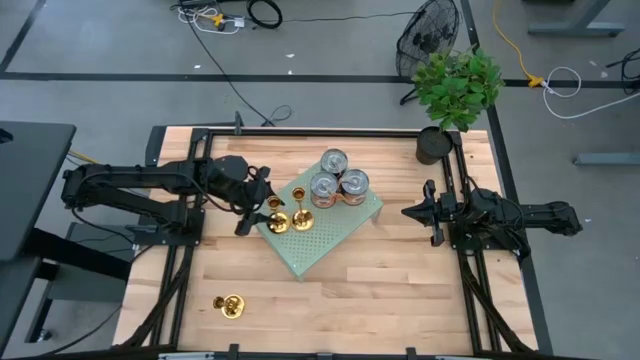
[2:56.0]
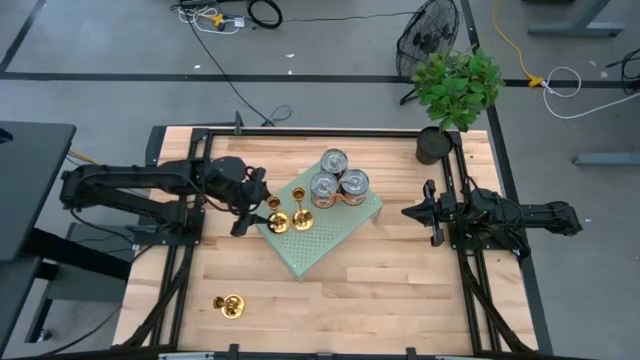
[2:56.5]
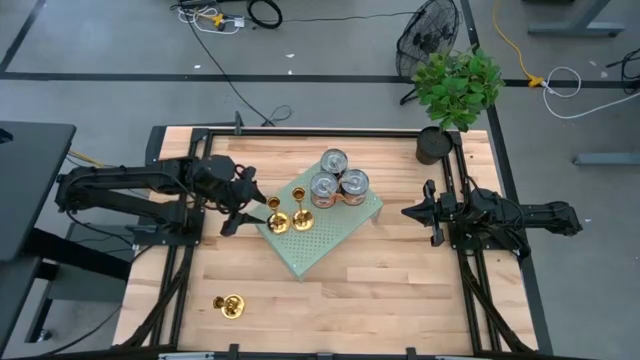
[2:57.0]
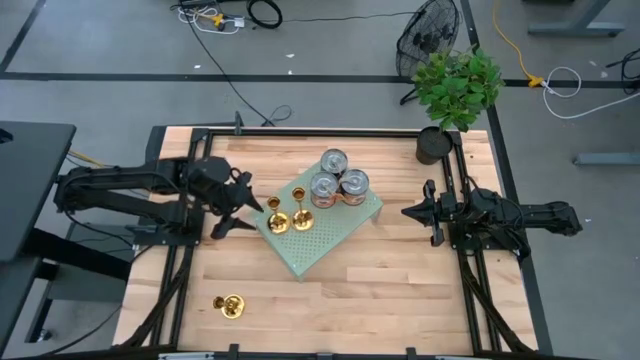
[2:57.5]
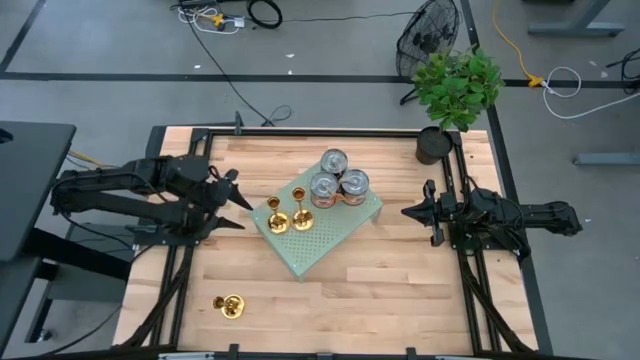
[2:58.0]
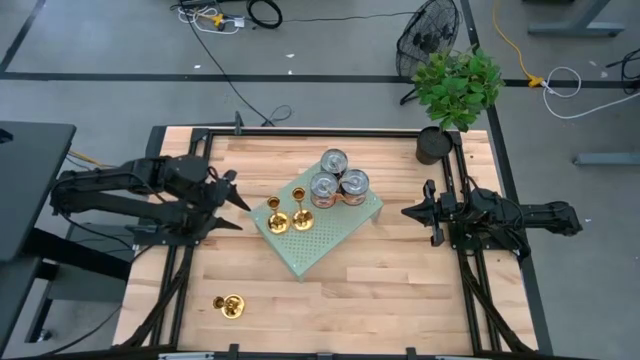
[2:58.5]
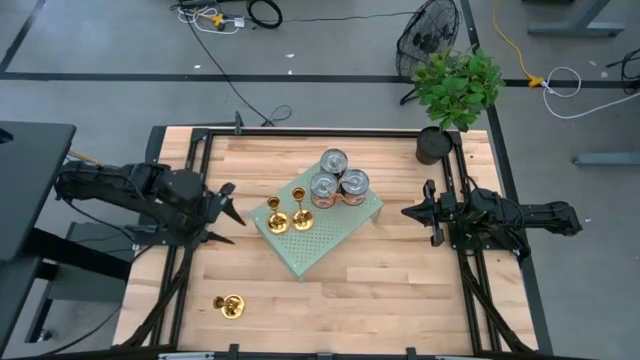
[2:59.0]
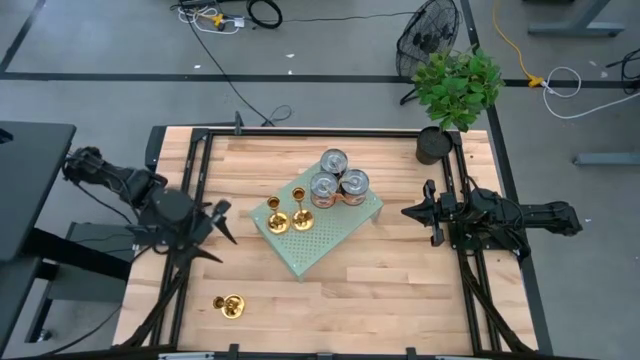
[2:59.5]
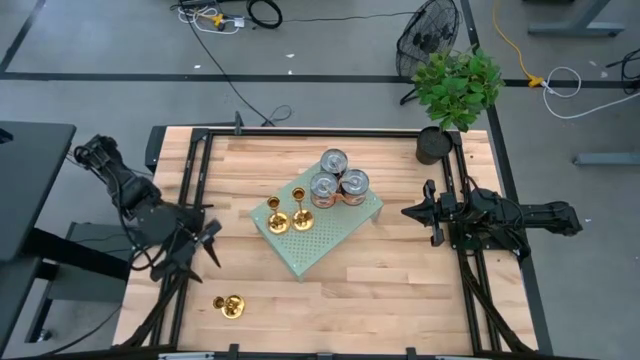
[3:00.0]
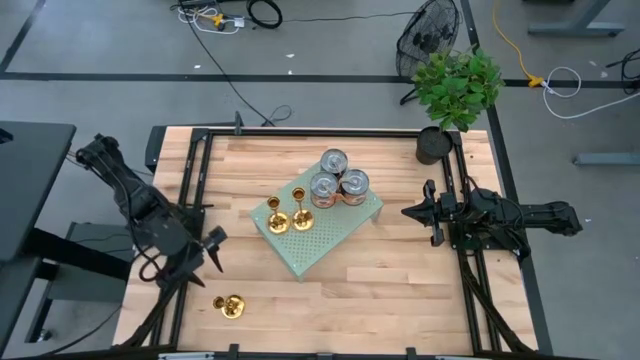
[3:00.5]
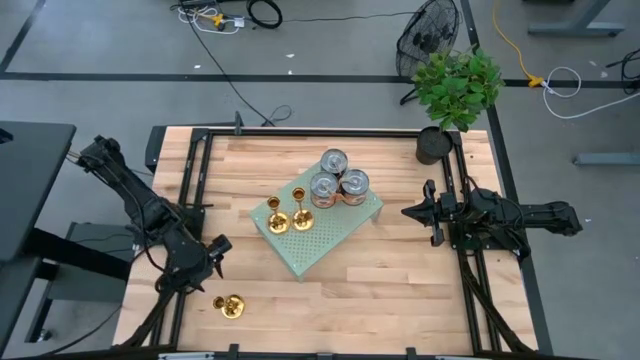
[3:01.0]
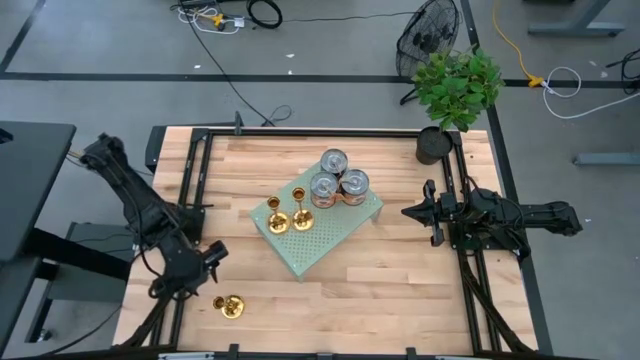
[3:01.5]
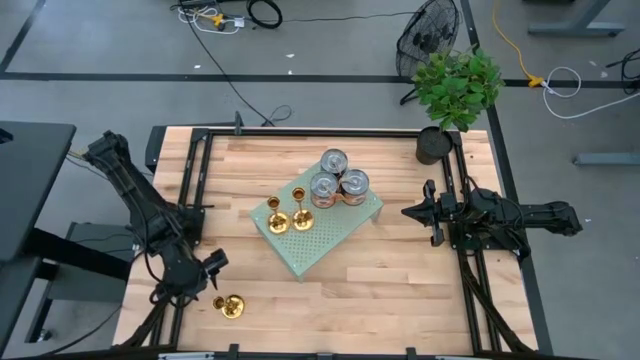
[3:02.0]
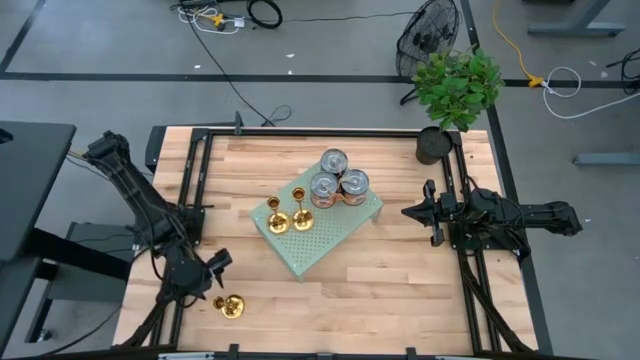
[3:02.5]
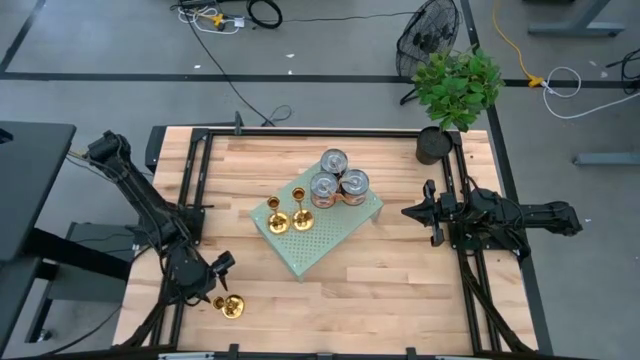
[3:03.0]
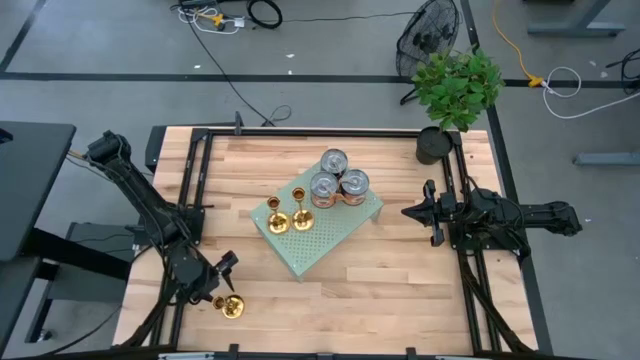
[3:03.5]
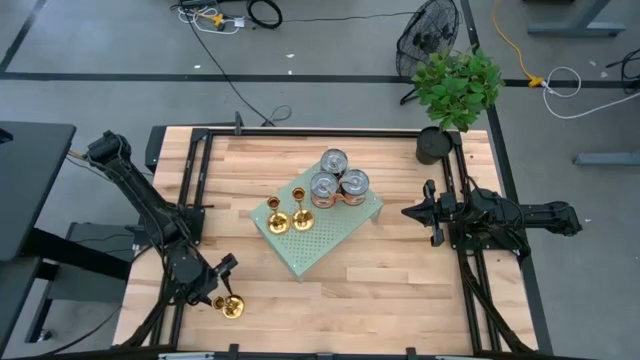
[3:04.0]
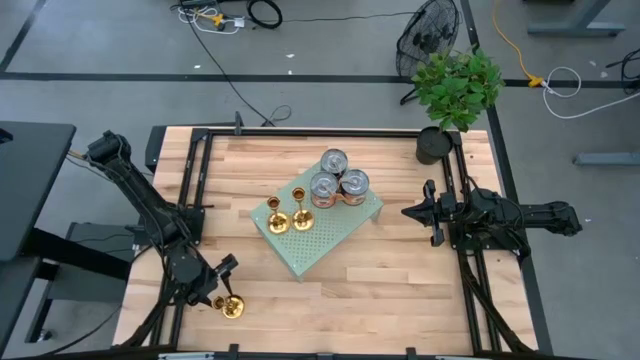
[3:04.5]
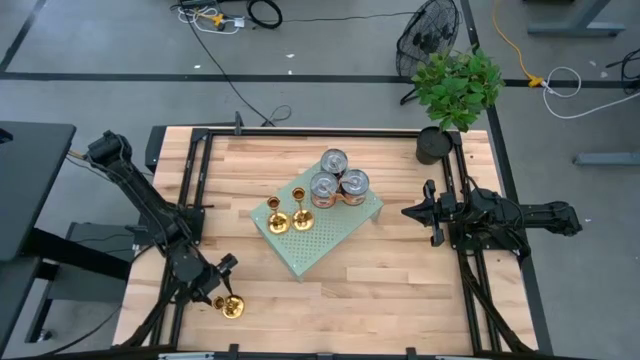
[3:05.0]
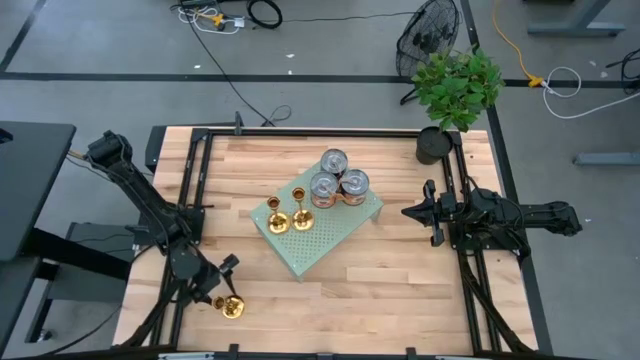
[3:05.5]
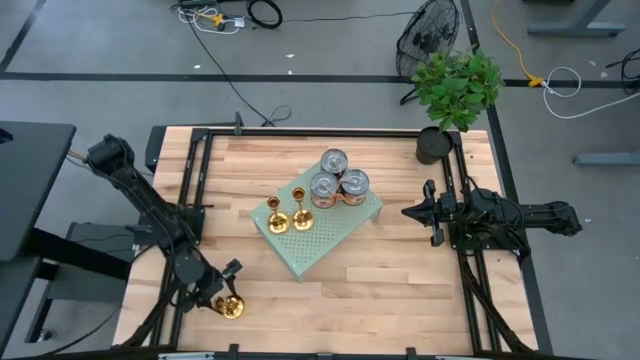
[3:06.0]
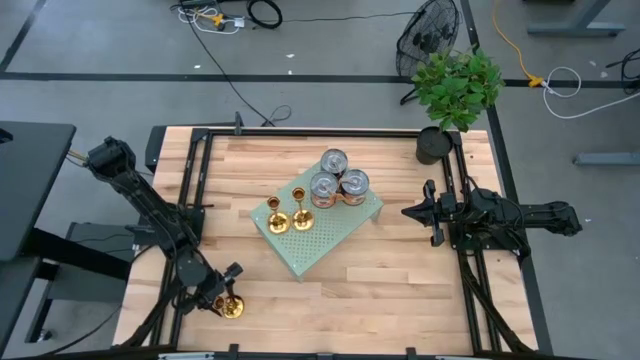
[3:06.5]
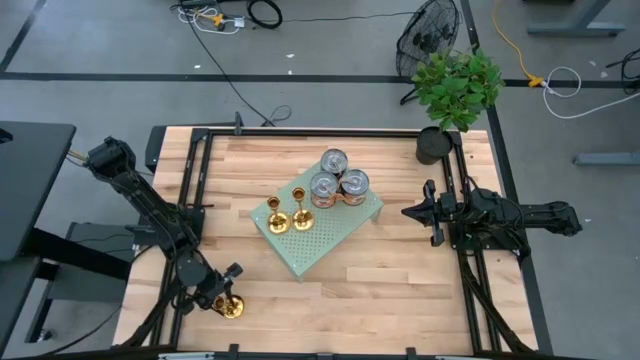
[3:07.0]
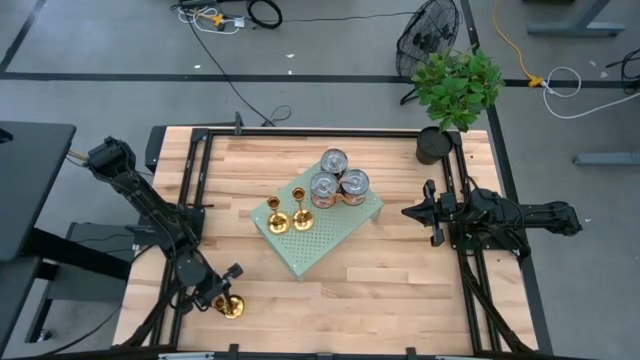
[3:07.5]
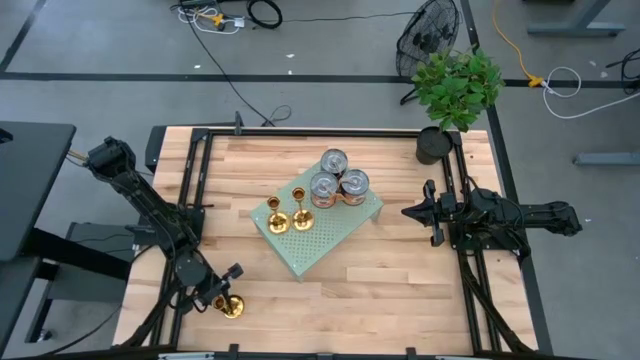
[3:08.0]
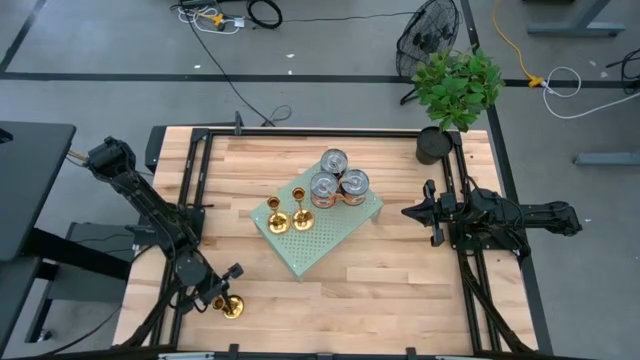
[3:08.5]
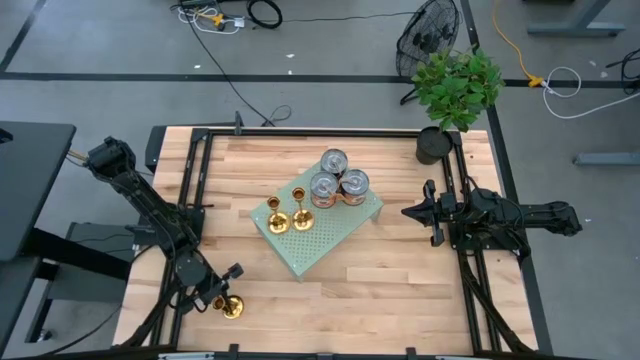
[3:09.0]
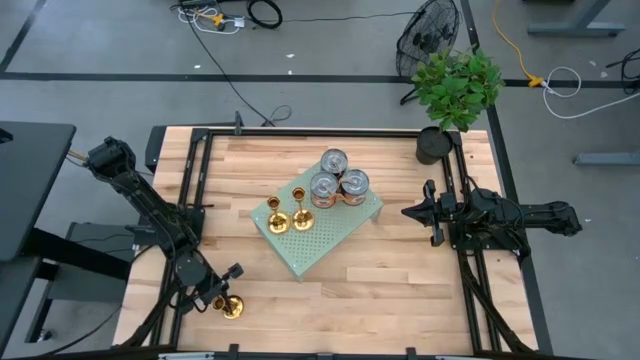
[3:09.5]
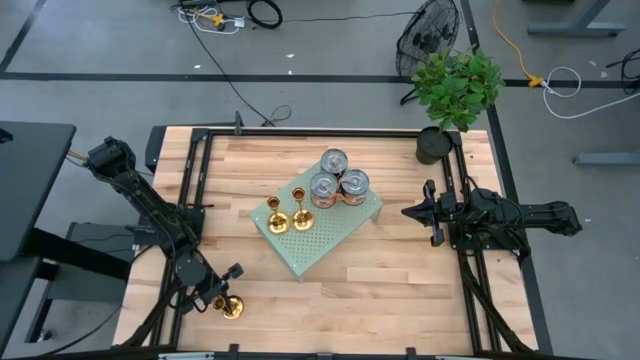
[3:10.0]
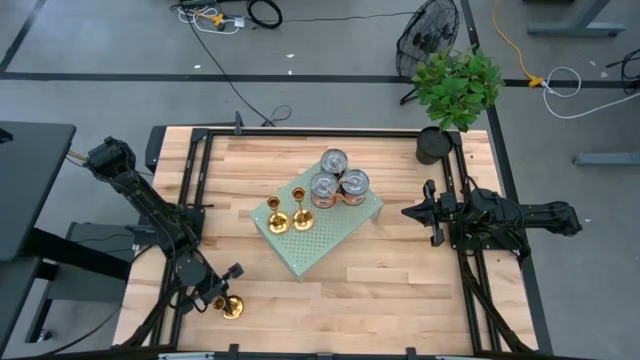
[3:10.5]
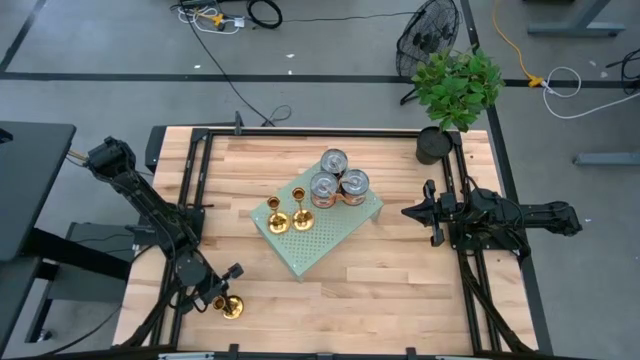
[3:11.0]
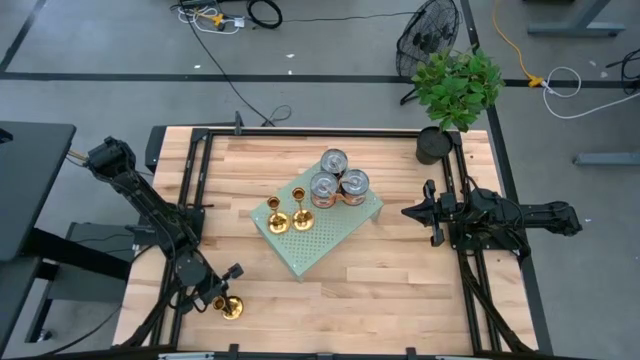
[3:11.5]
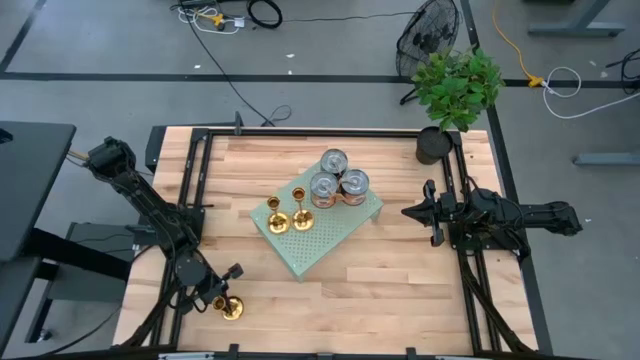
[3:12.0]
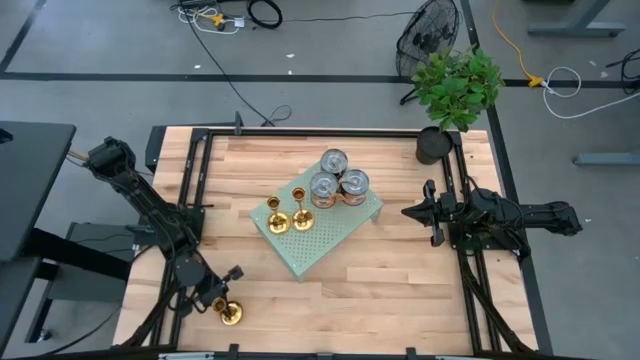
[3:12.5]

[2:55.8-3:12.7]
Task: Pick & Place candle stick holders
Put the gold candle holder on the shelf

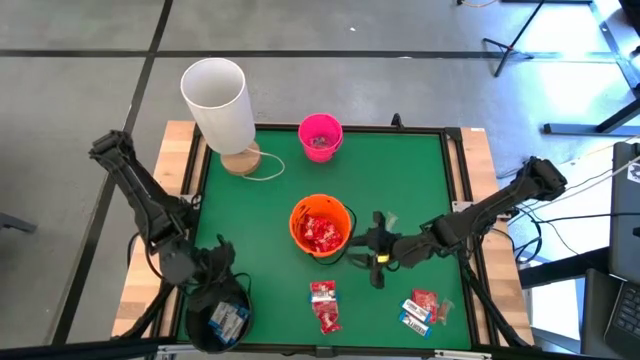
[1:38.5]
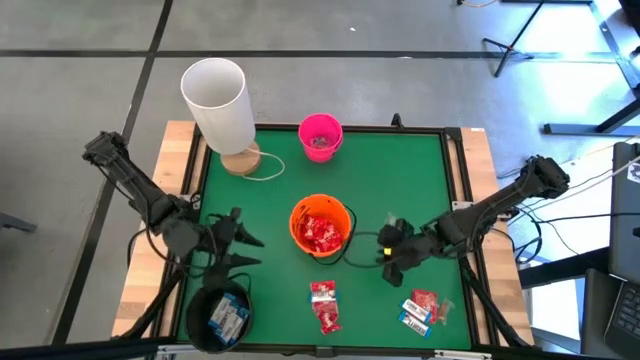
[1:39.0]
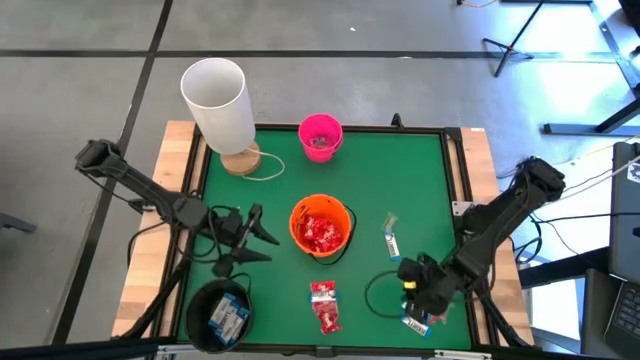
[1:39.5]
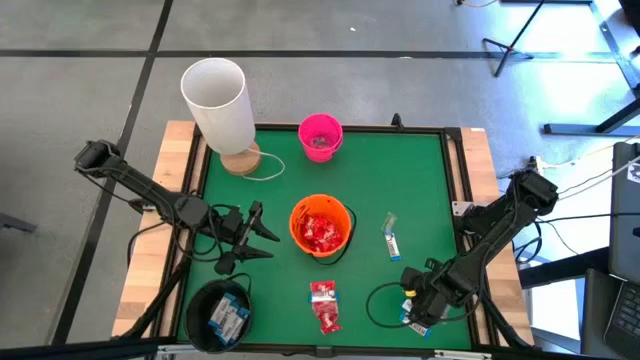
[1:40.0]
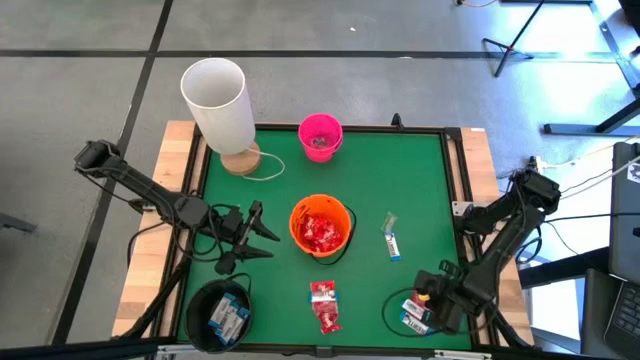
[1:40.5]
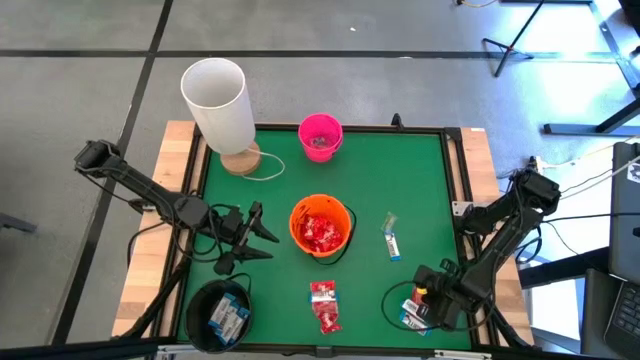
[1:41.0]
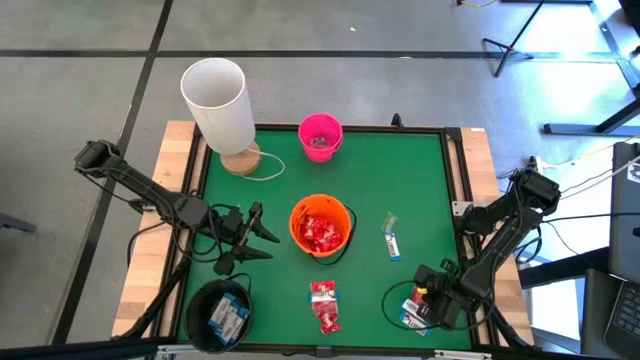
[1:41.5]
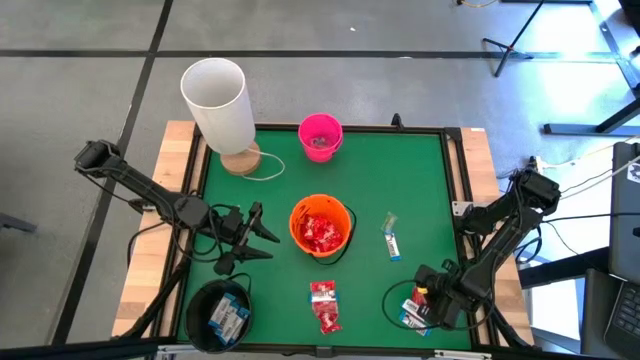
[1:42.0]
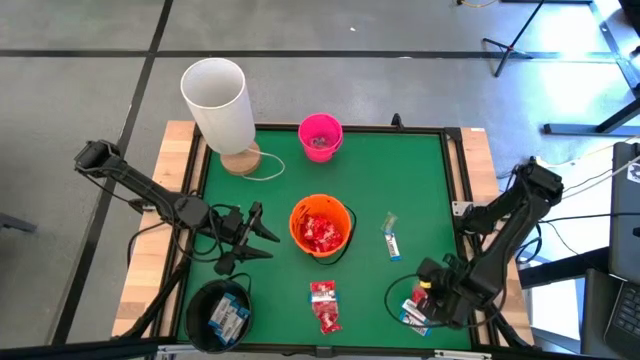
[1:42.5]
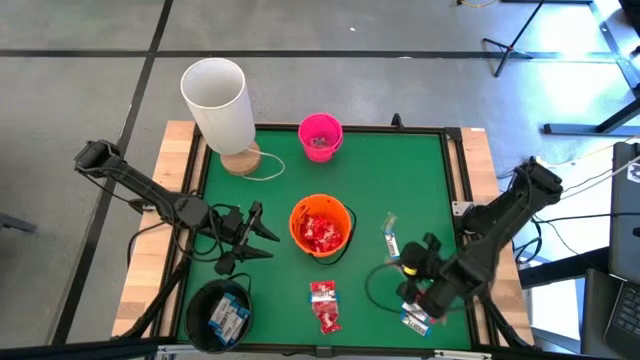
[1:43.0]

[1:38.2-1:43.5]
Task: Sort candy
Put the orange gummy into the pink bucket
